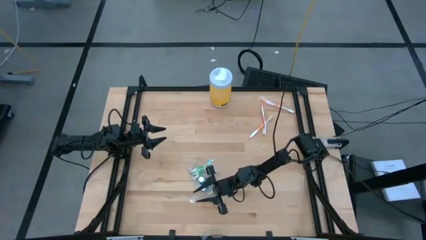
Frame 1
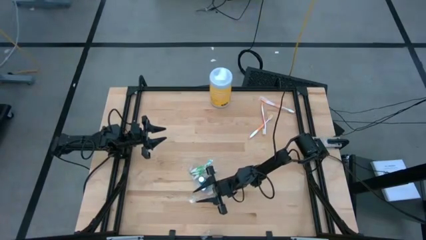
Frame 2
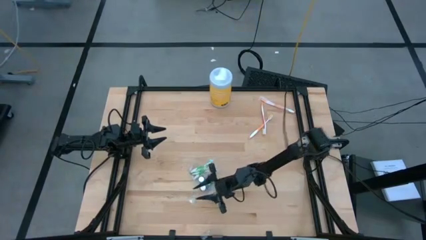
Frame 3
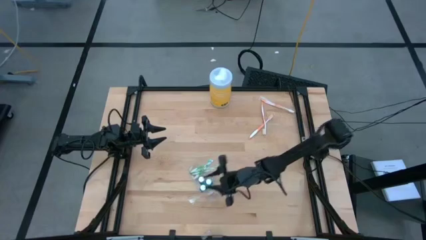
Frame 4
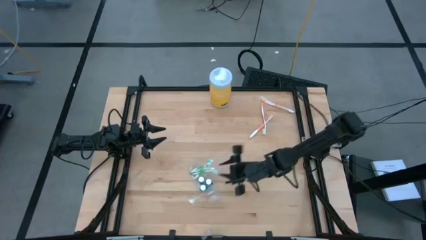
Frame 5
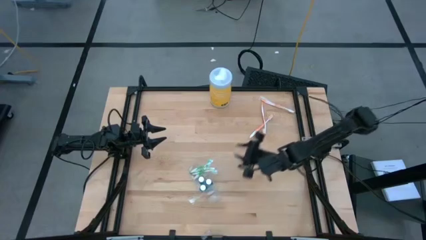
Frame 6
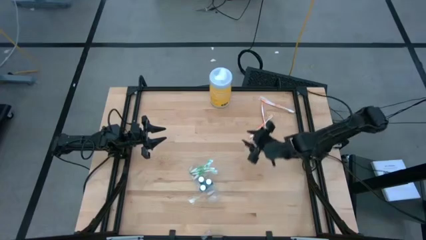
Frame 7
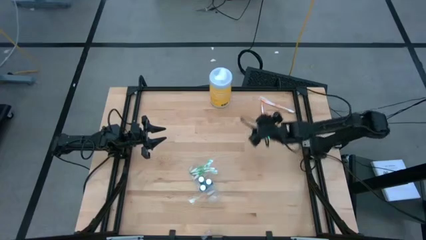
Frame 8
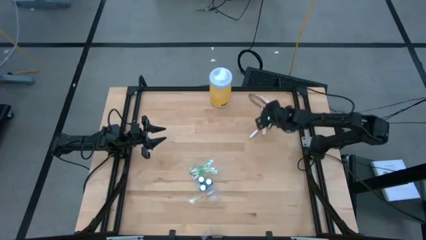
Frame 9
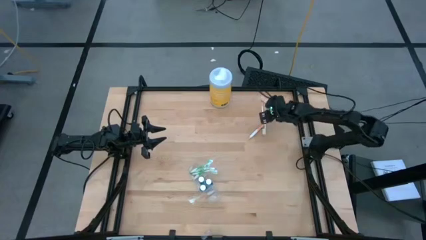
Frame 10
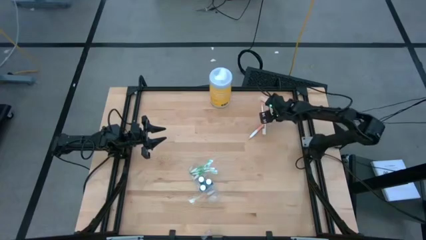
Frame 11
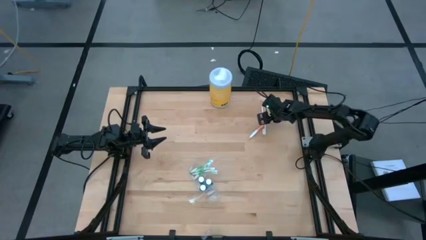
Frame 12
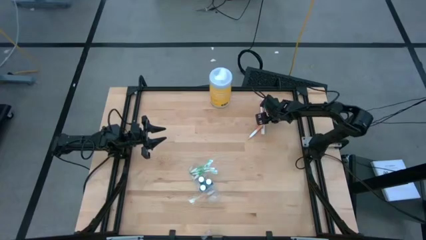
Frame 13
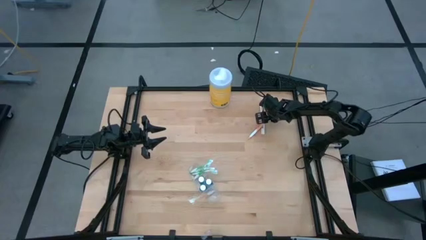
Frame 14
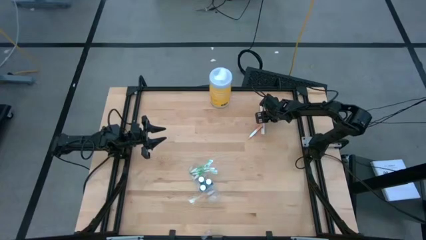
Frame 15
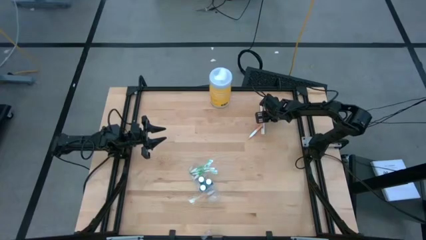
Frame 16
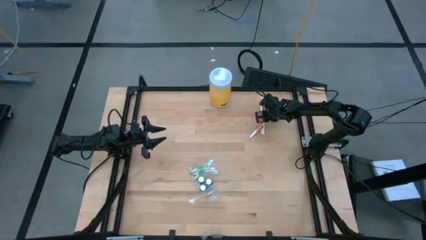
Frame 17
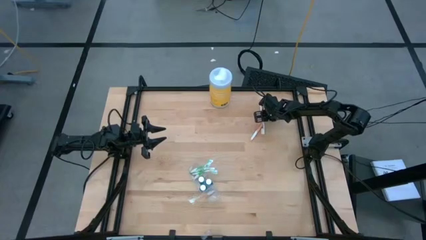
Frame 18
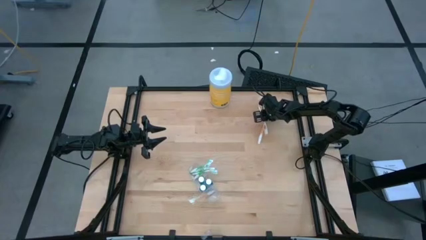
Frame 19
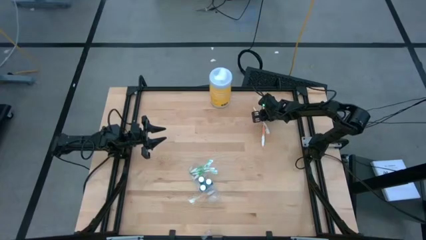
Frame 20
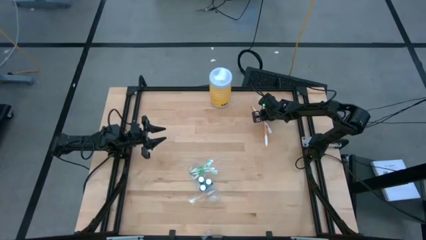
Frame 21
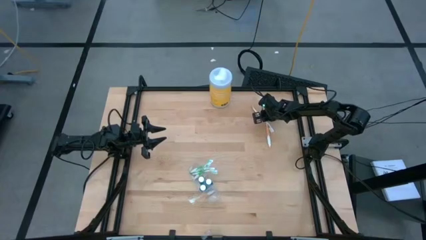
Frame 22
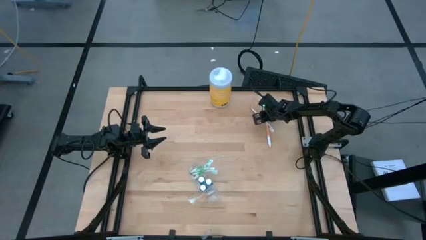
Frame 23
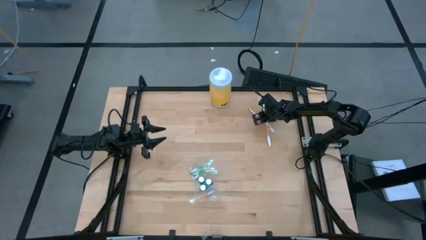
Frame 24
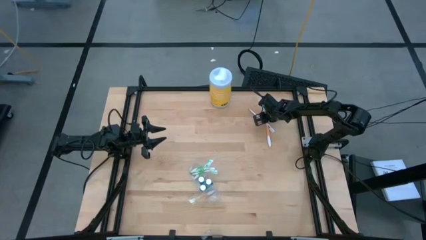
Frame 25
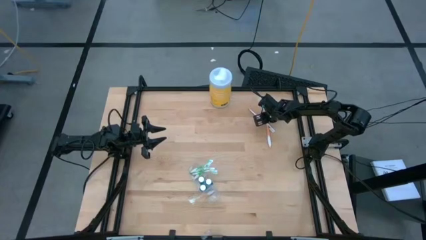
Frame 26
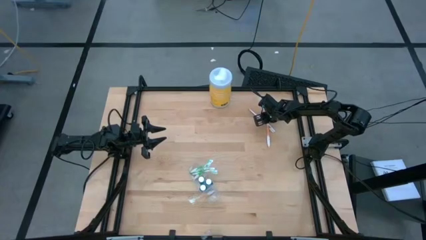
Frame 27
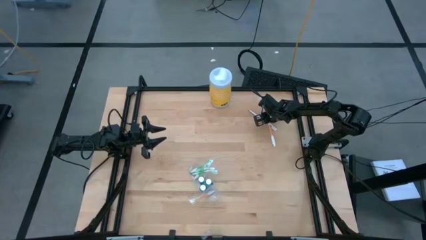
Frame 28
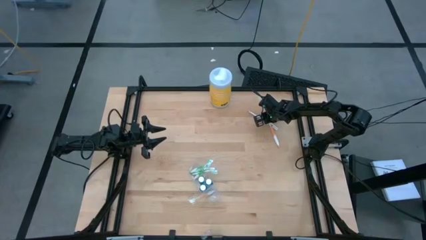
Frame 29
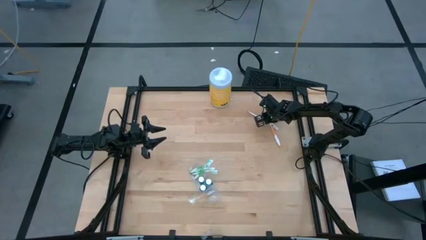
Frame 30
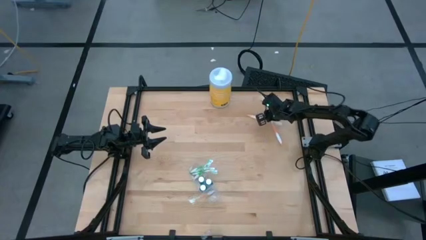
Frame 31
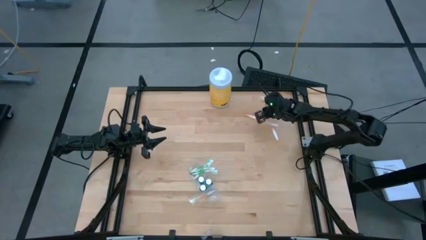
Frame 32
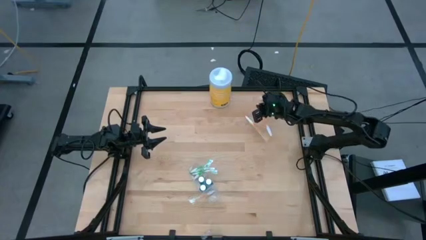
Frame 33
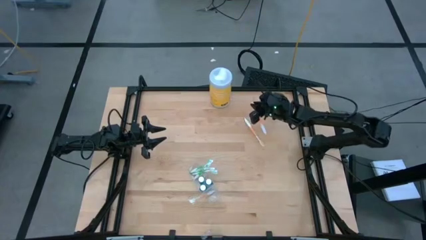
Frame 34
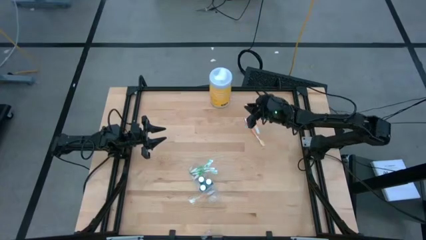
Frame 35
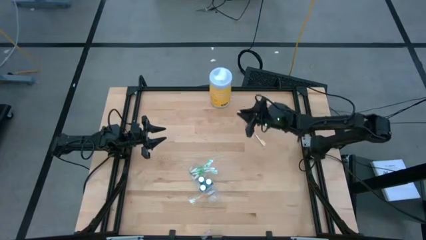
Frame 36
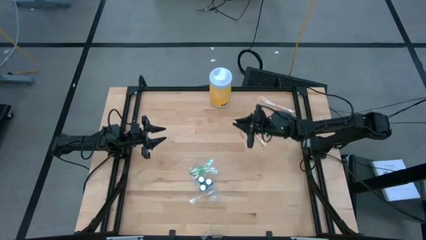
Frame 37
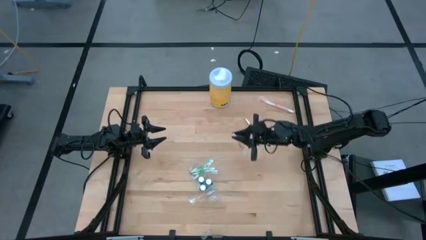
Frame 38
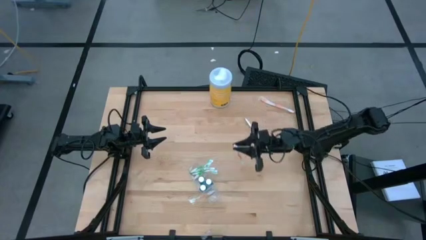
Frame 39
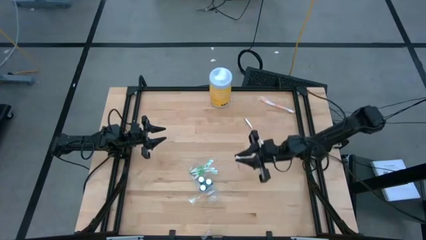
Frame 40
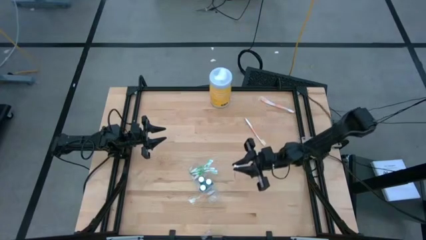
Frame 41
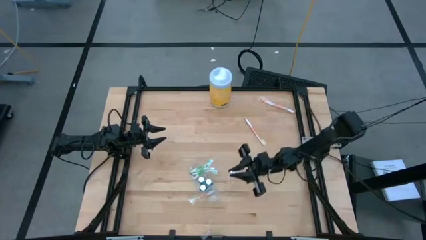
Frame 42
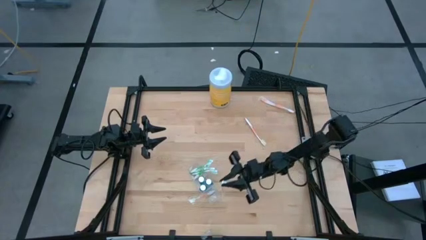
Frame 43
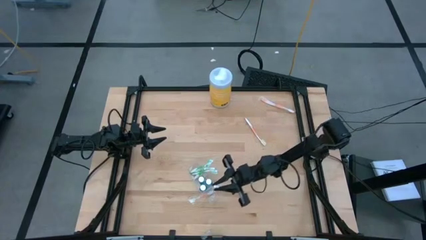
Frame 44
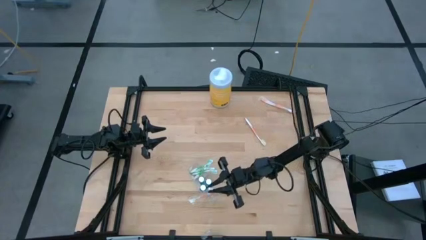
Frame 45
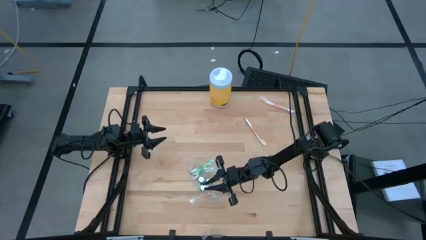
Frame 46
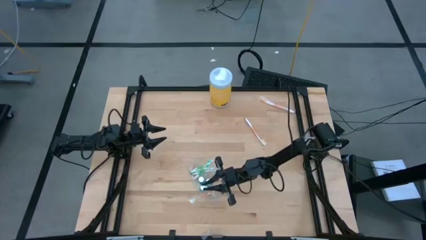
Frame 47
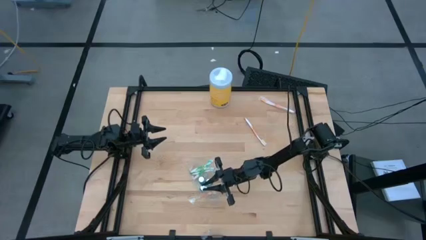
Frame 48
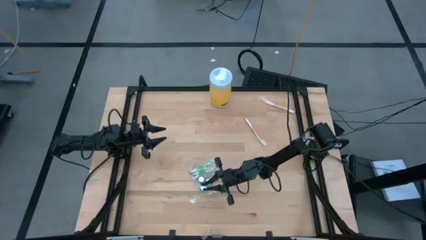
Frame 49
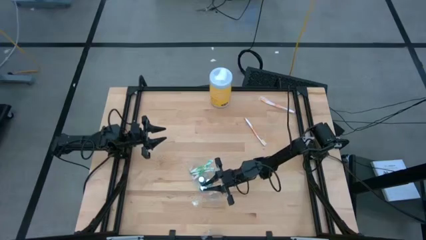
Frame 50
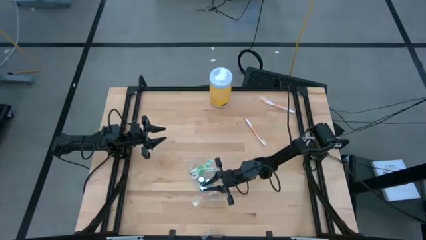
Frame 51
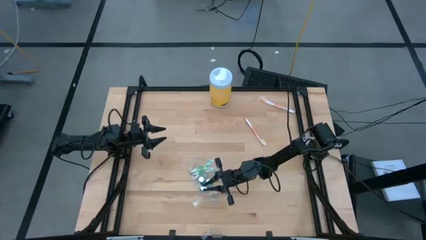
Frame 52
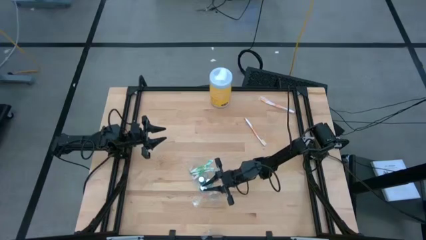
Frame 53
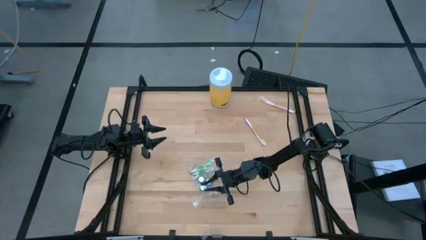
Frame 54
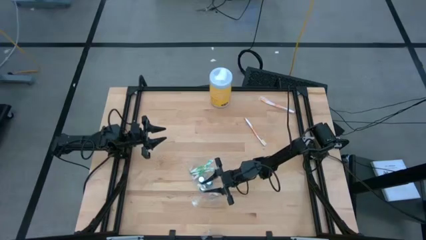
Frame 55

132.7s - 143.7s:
Task: Pick & Place toothbrushing station
Put the orange toothbrush into the transparent organizer

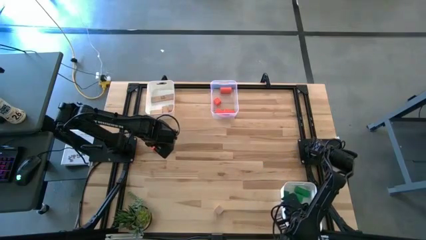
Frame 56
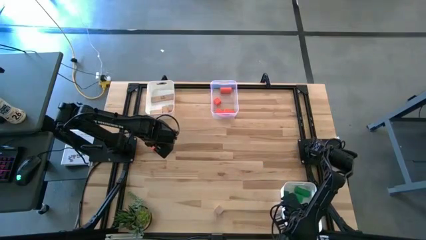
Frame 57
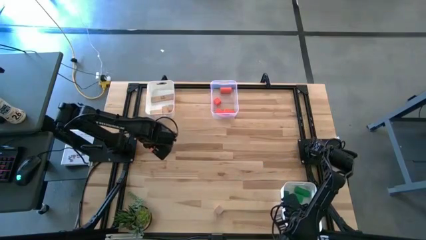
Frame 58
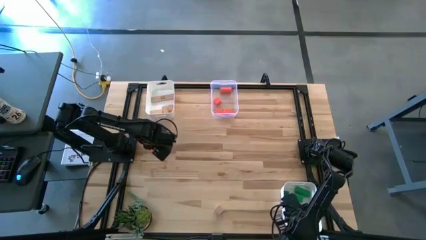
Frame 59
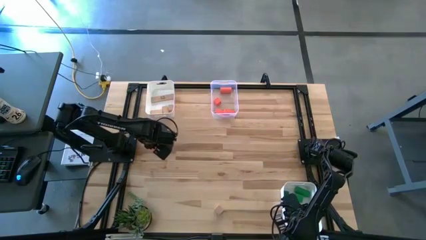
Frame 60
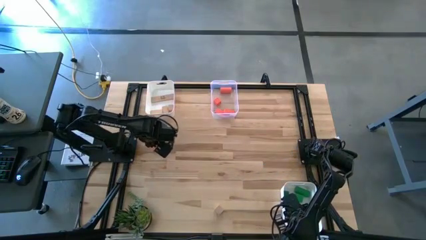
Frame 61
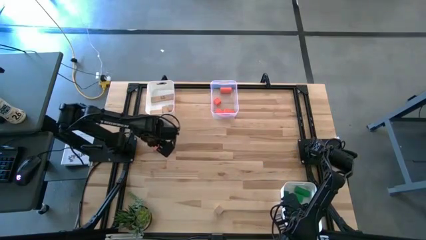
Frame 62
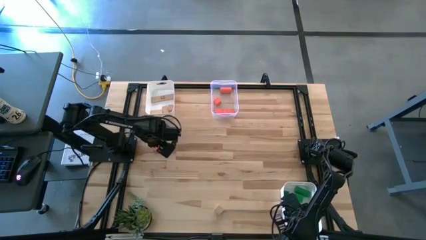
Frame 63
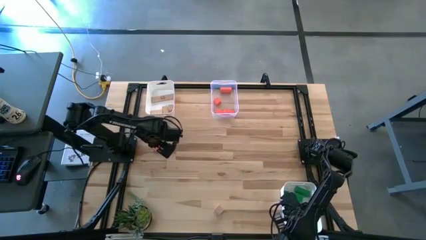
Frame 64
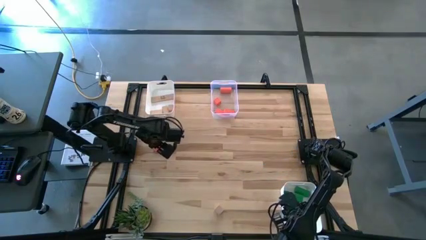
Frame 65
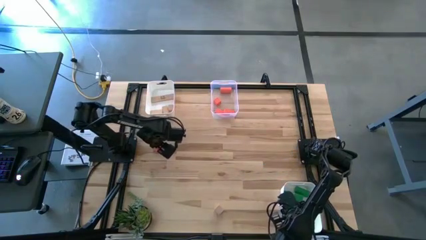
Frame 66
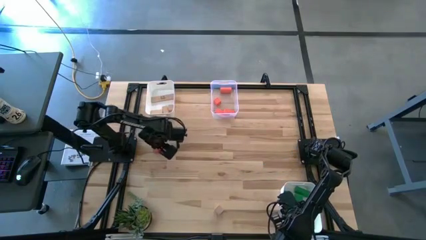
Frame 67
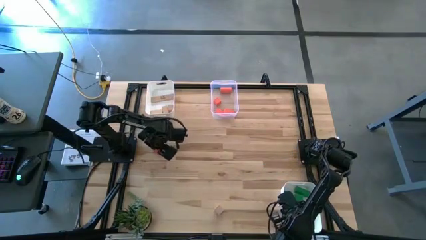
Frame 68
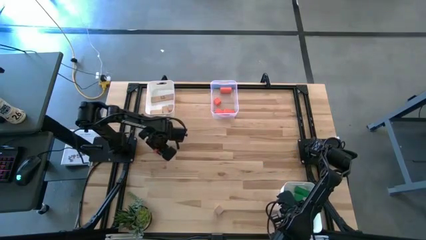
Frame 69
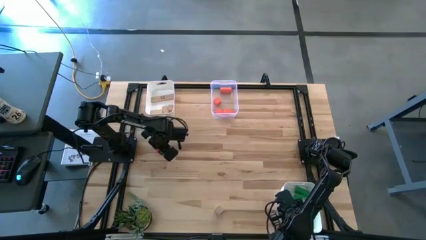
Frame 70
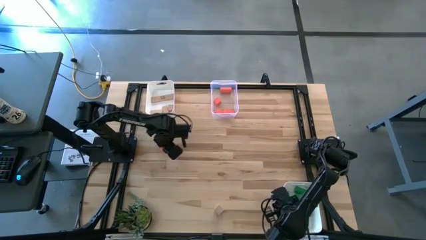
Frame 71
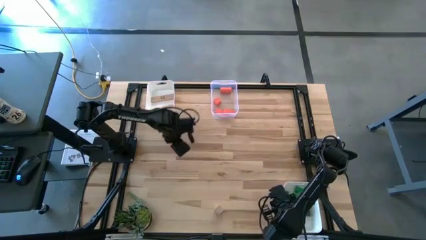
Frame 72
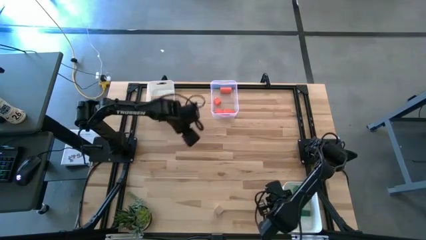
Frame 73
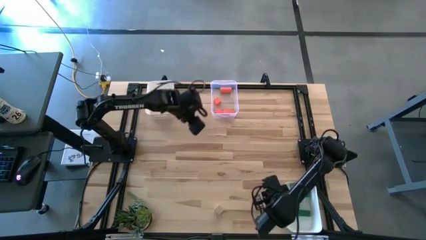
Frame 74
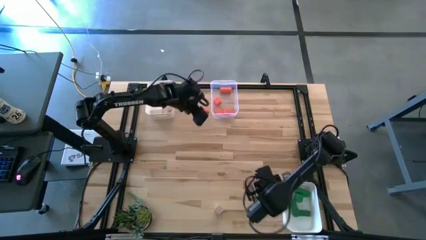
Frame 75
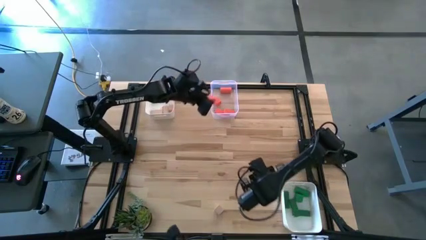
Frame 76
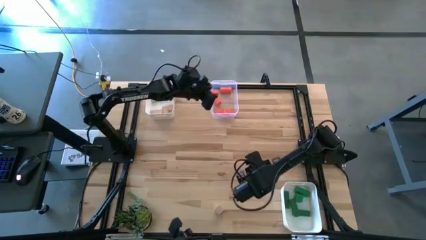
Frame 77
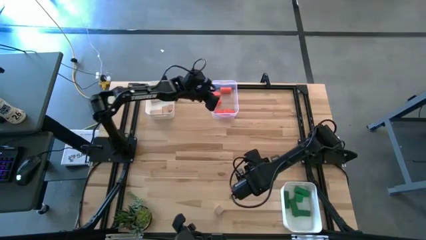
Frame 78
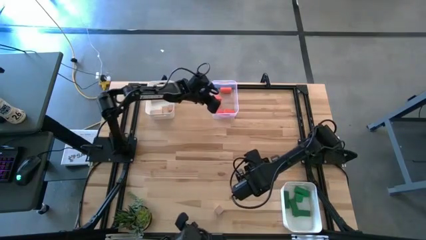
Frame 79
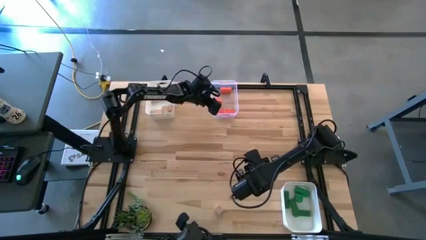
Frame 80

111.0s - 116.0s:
Task: Sort & place blocks by color
Put the orange block into the transparent bin

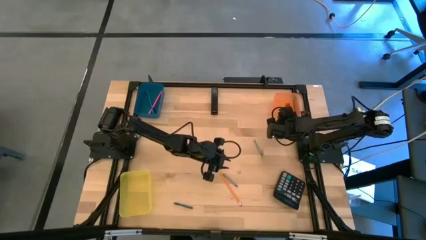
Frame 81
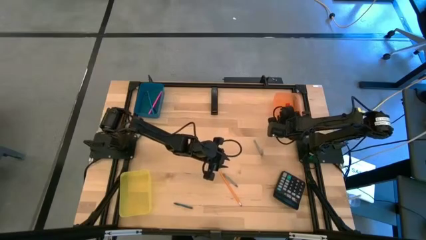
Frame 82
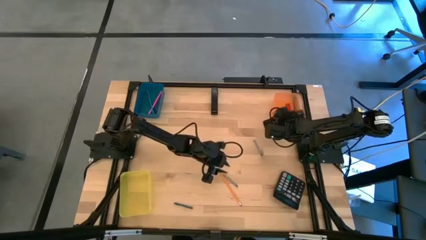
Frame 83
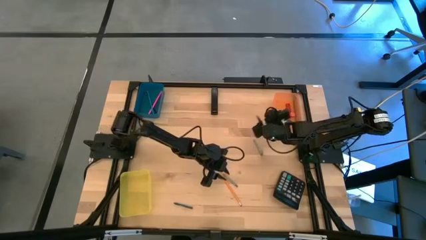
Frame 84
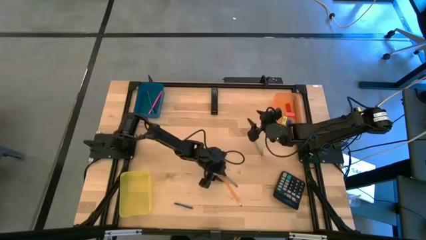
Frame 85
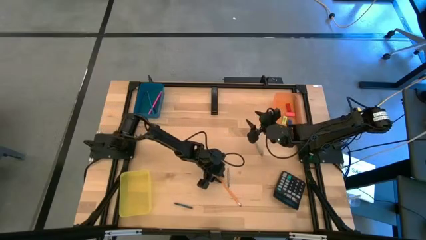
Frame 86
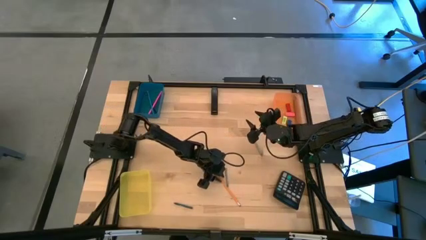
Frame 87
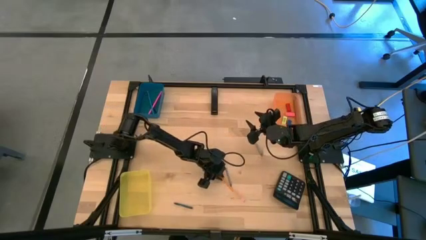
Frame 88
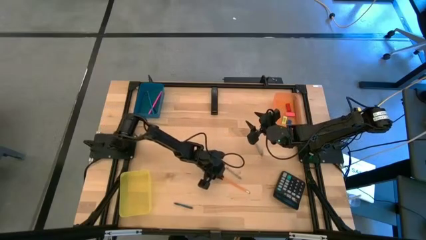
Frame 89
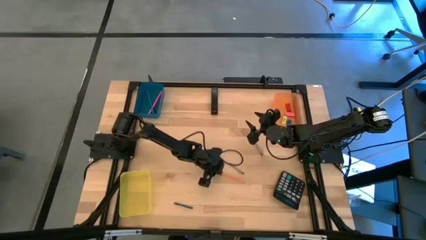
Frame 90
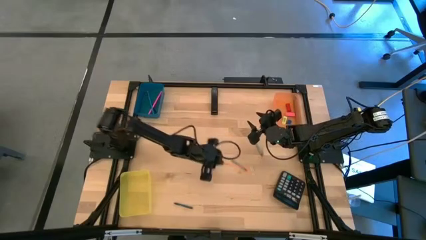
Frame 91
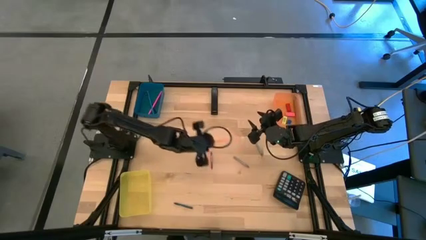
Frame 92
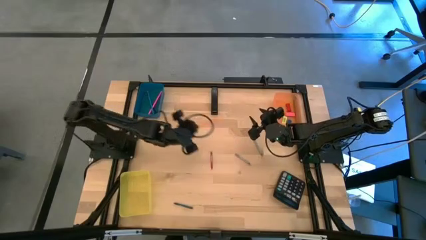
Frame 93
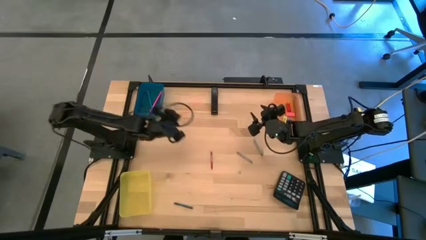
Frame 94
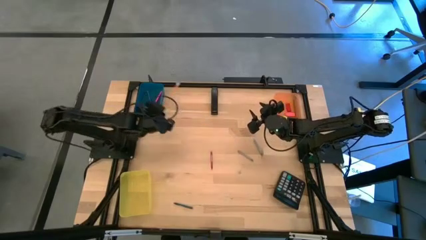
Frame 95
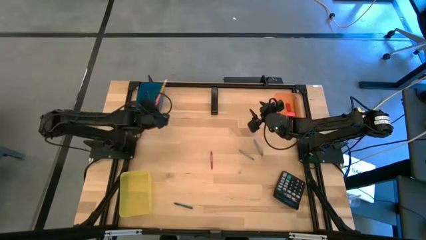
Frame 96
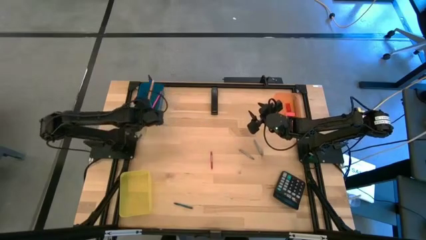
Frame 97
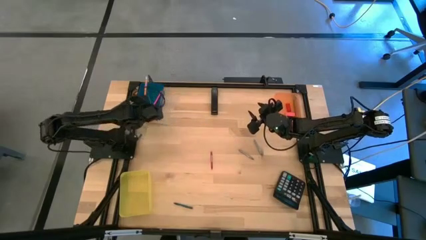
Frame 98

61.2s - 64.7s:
Task: Sort crayons/erasers/pens/pencils in bins
Put the orange pencil into the blue bin
